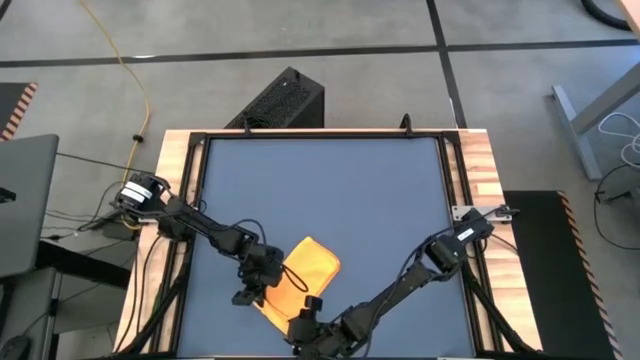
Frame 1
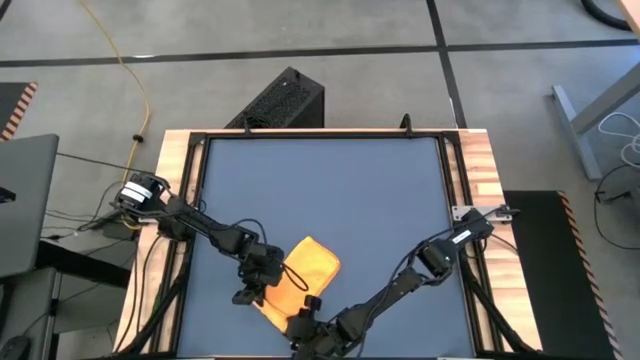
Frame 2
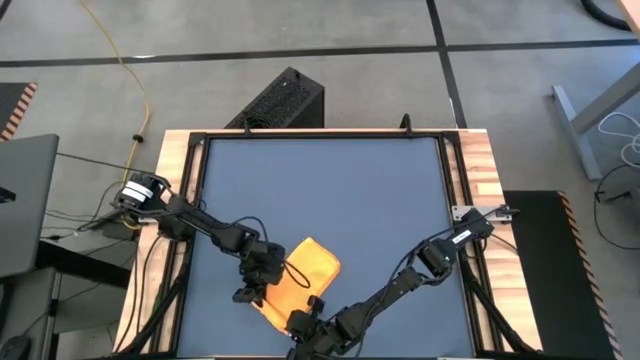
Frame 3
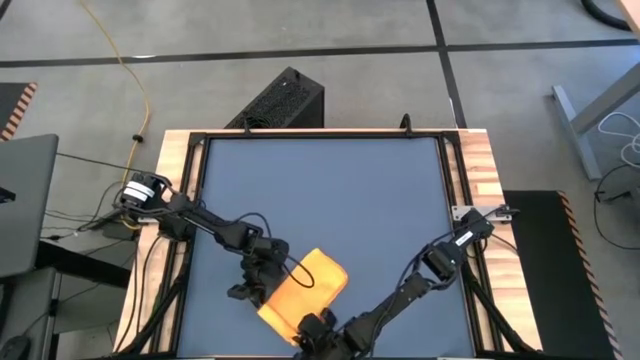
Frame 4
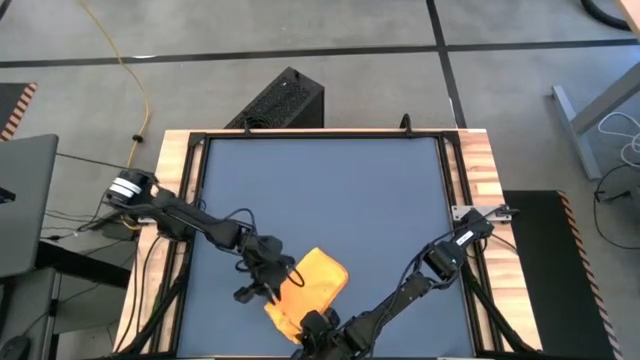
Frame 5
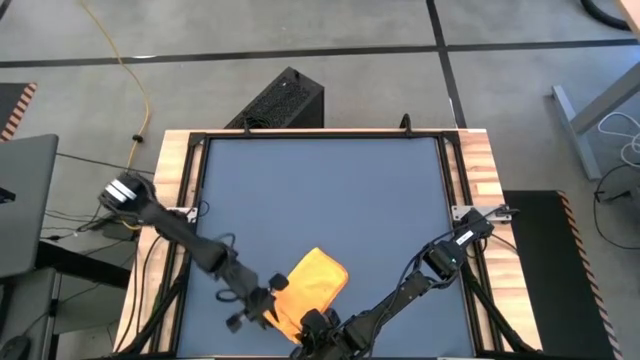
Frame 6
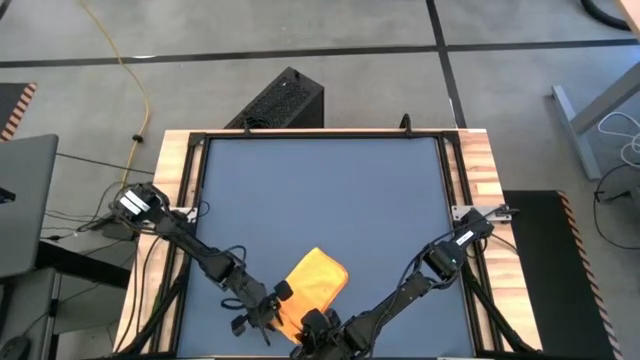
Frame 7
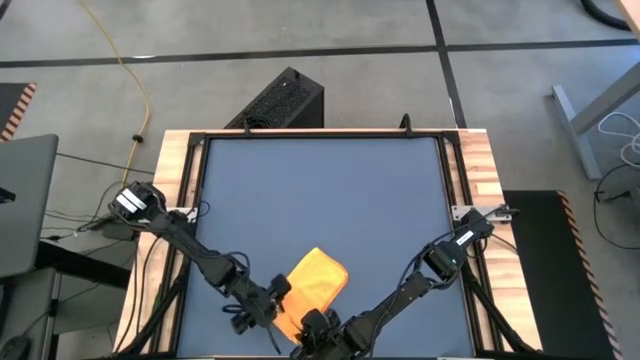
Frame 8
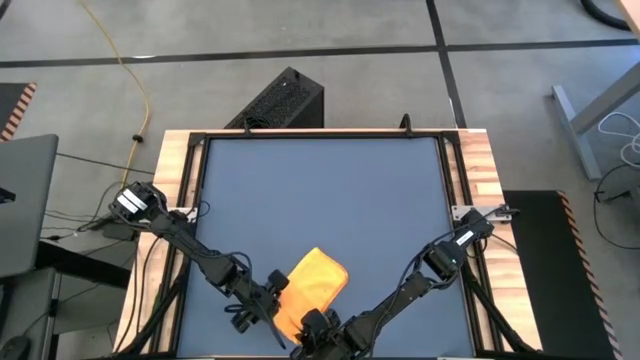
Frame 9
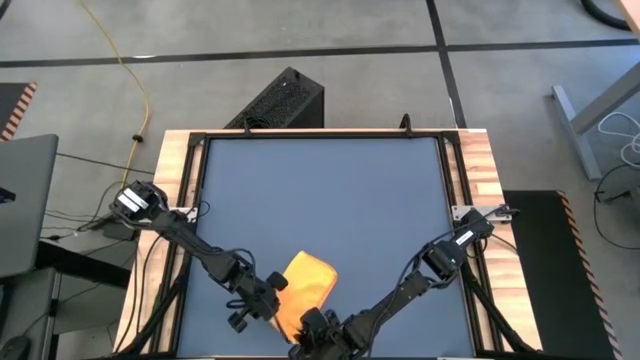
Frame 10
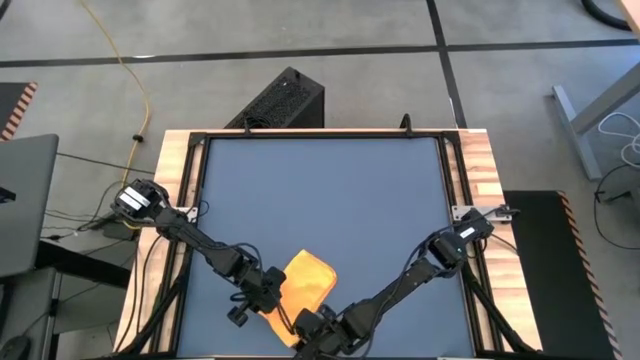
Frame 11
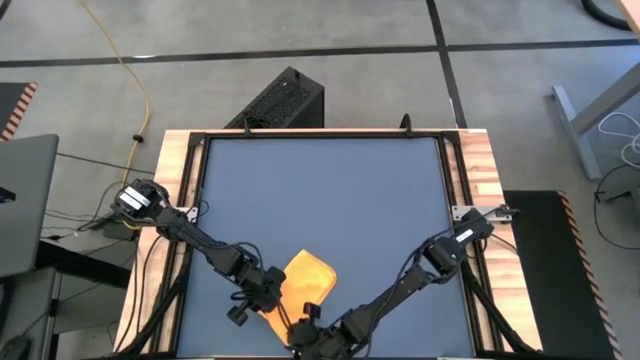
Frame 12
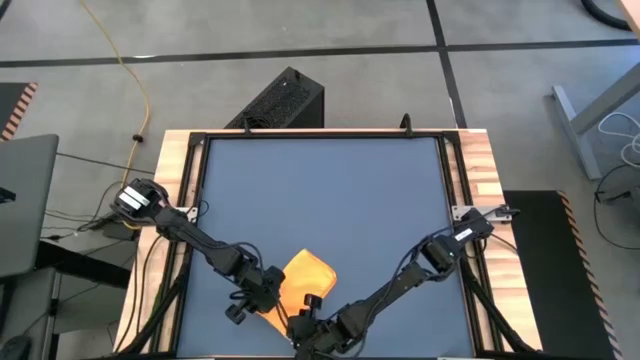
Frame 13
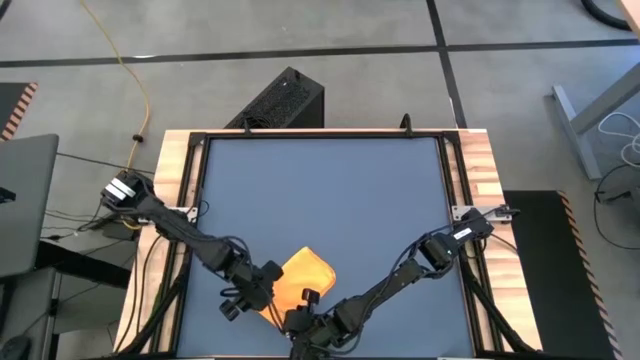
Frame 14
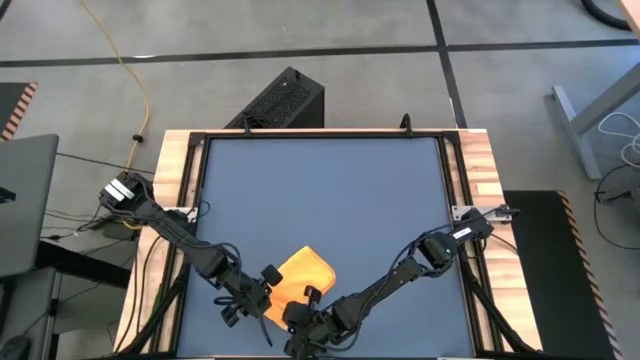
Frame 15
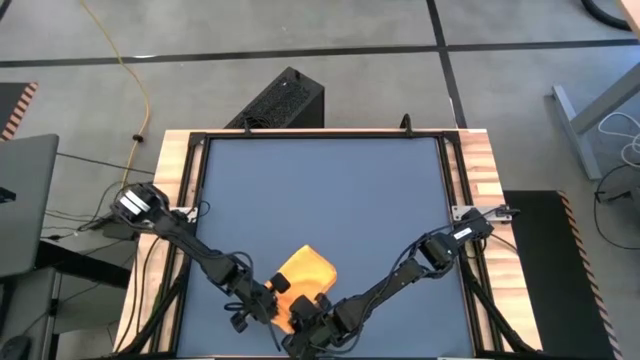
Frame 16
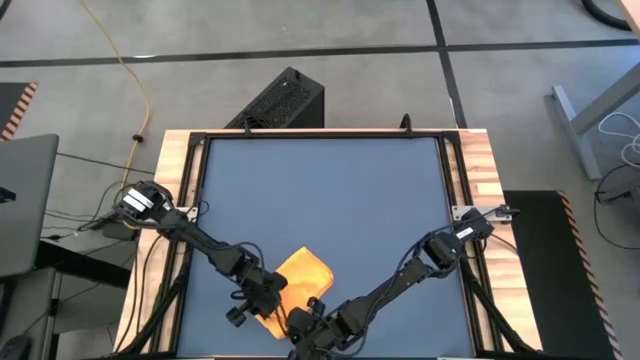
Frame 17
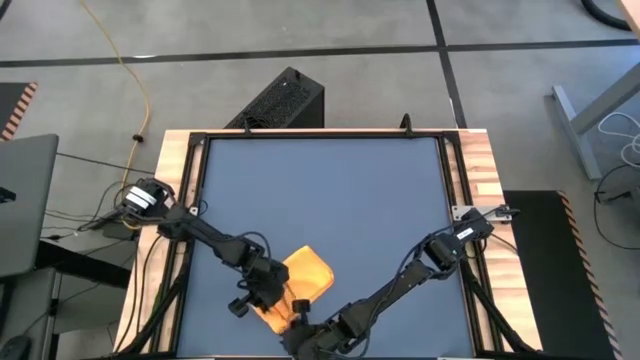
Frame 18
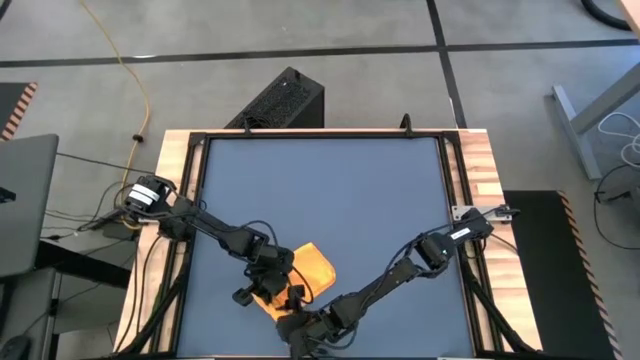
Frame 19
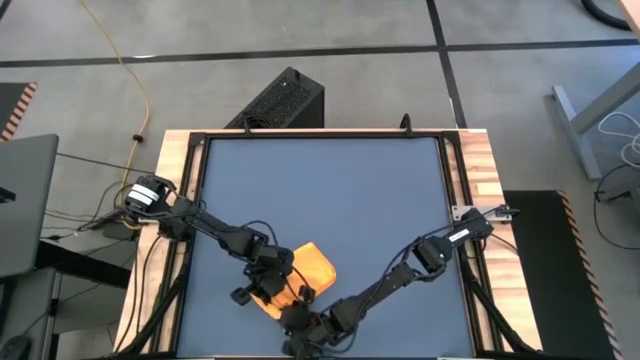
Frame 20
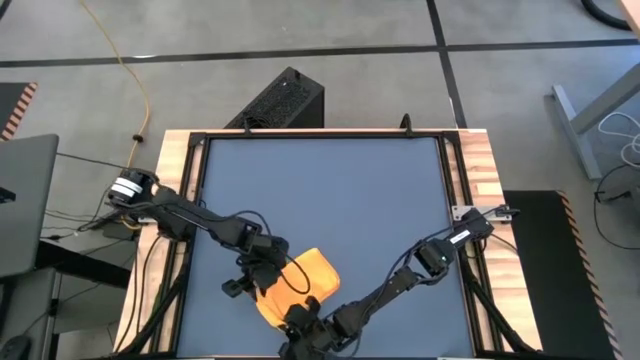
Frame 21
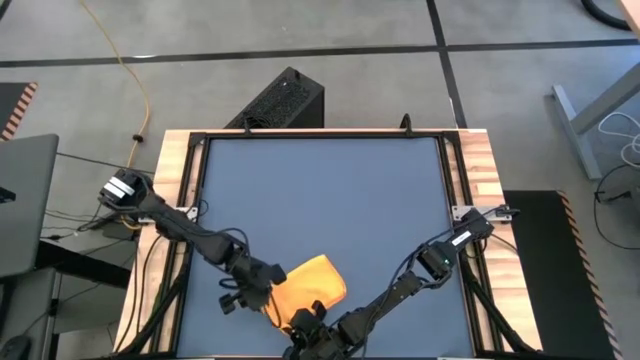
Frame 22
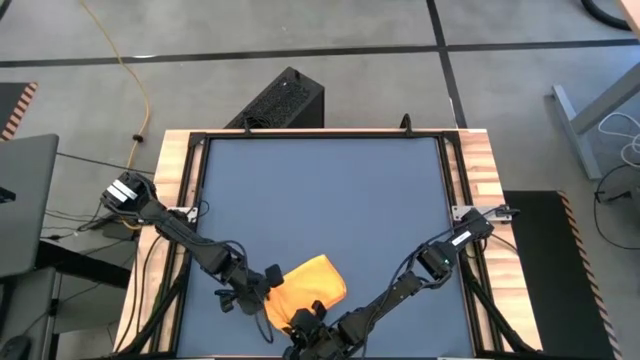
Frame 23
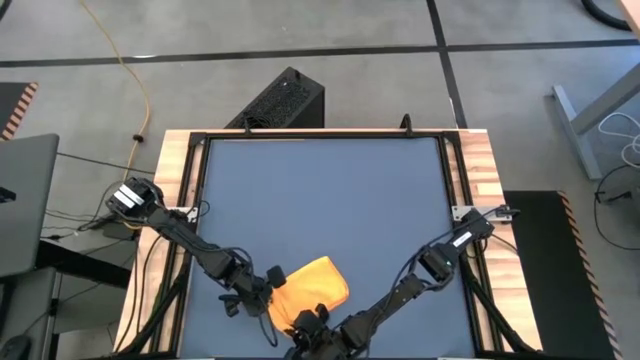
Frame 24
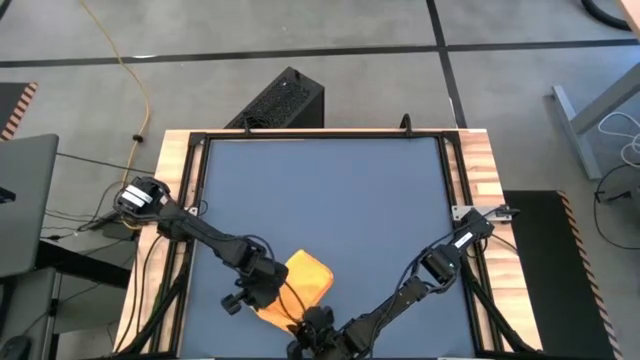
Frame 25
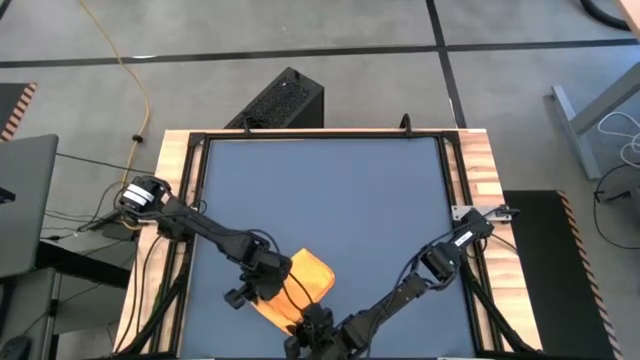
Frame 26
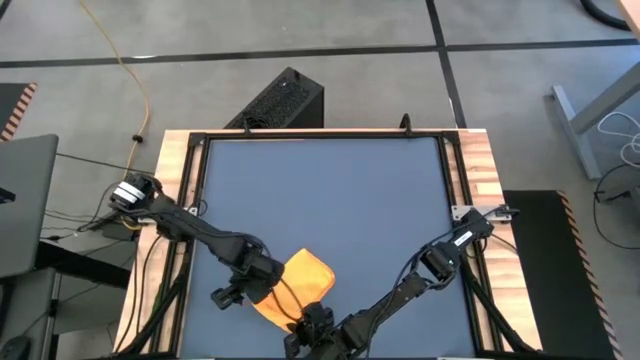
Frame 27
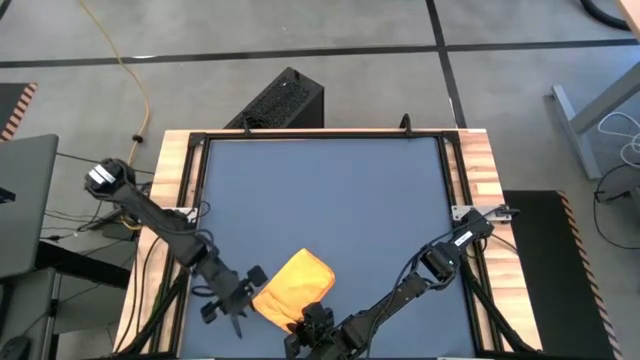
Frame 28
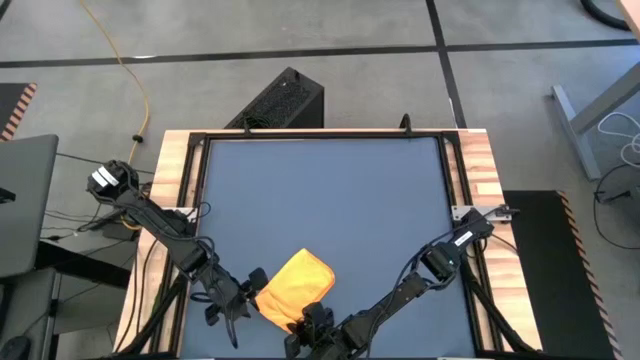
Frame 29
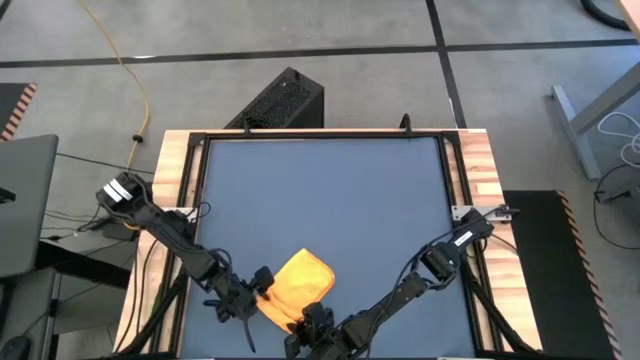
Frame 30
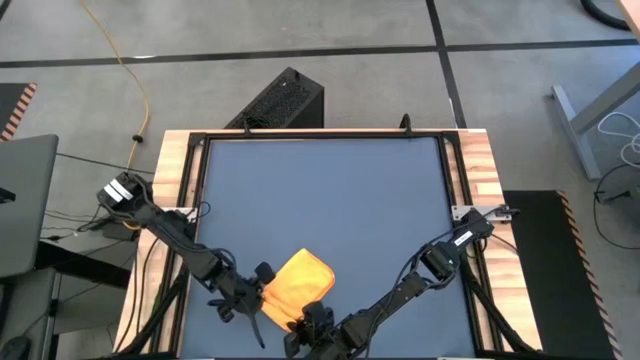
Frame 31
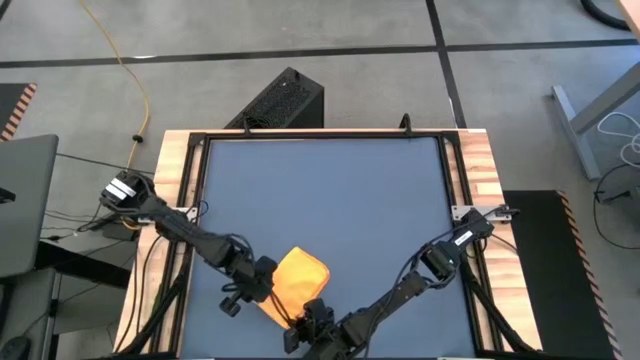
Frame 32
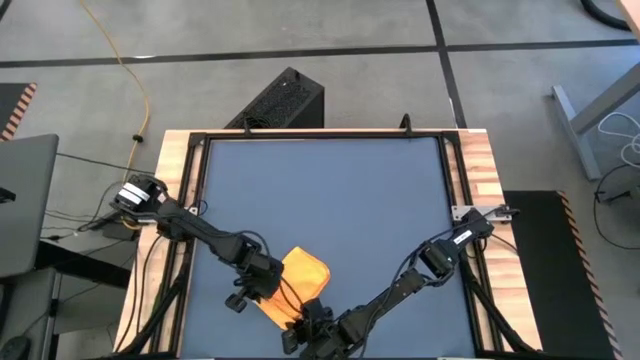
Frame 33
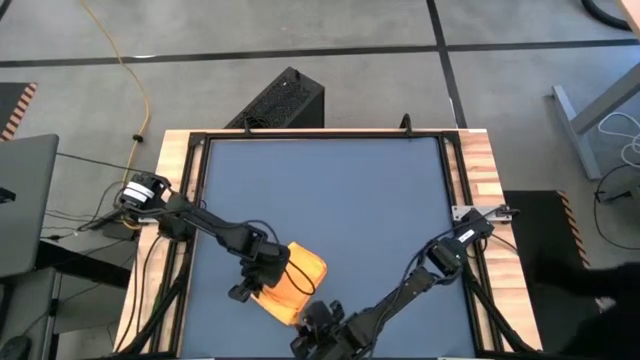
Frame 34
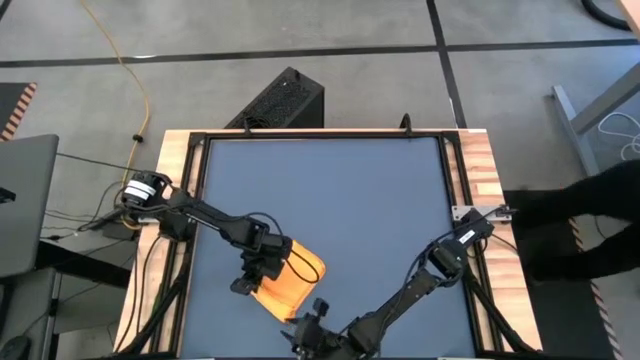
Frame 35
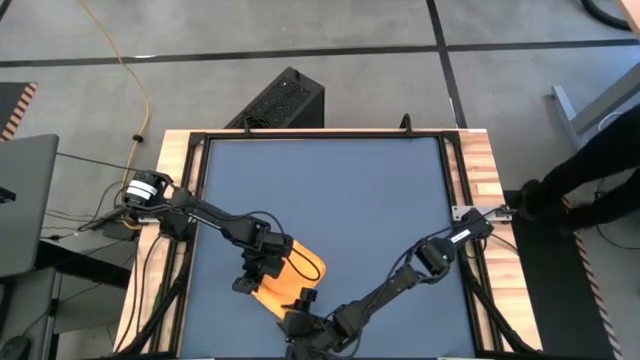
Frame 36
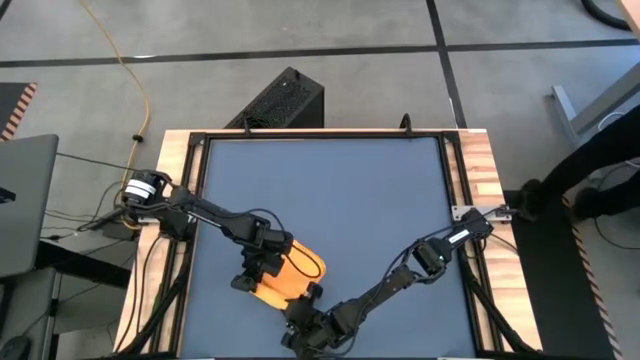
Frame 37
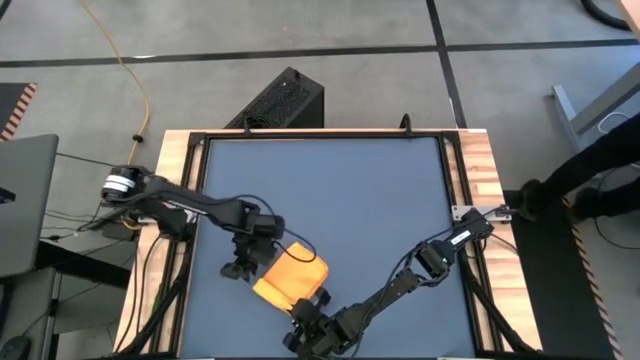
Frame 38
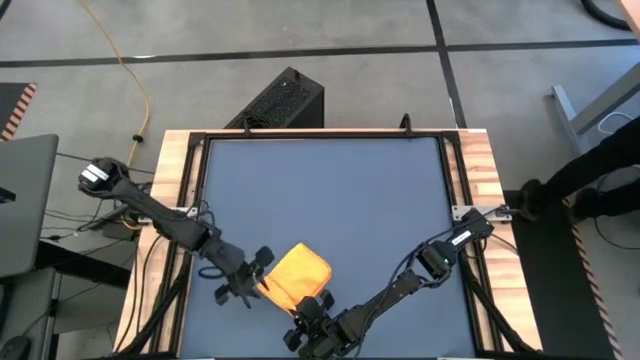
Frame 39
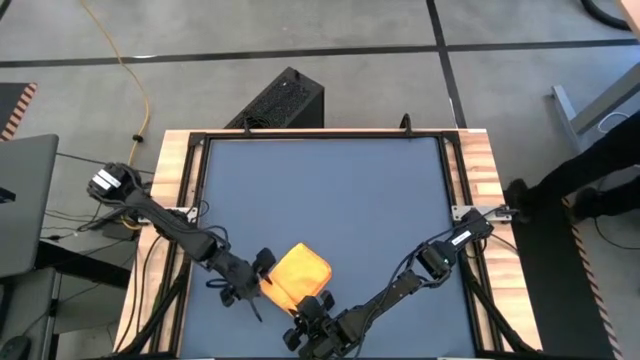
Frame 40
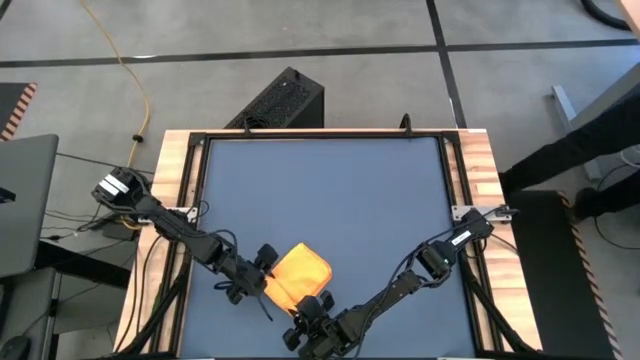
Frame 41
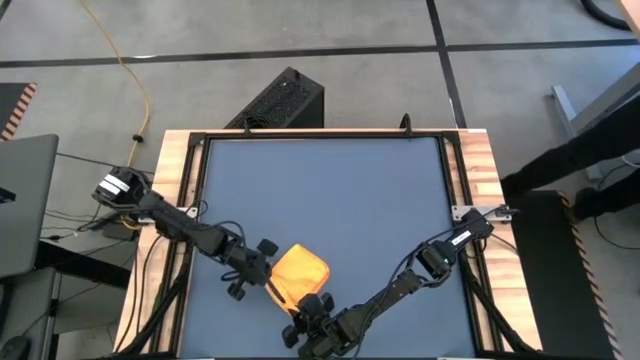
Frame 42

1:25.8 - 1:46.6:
Task: Roll towel
Roll the orange microfiber towel

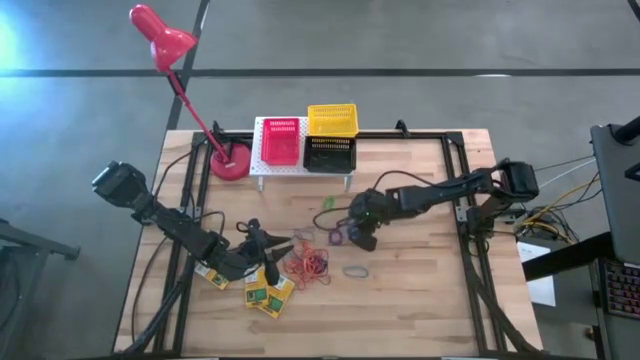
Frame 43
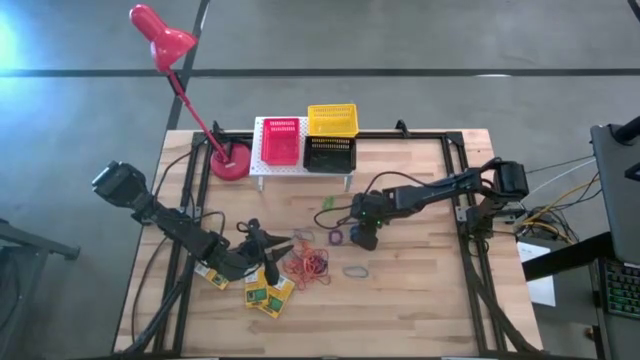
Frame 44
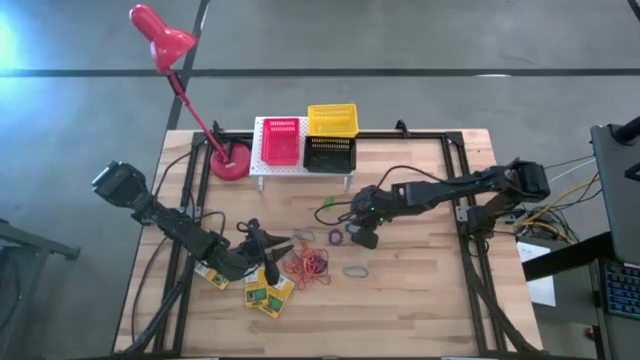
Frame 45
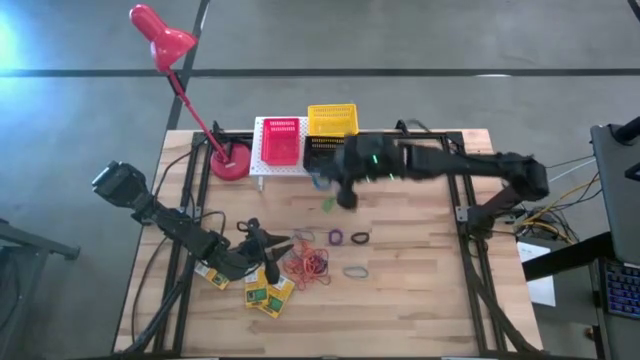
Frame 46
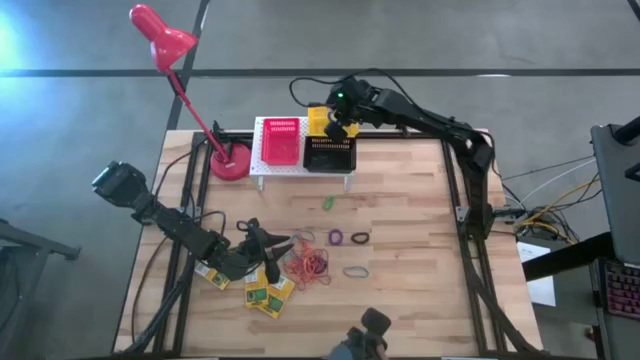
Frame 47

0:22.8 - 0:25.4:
Task: Pick & Place Office Desk Supplies
Put the blue spring keychain into the yellow bin on the shelf
